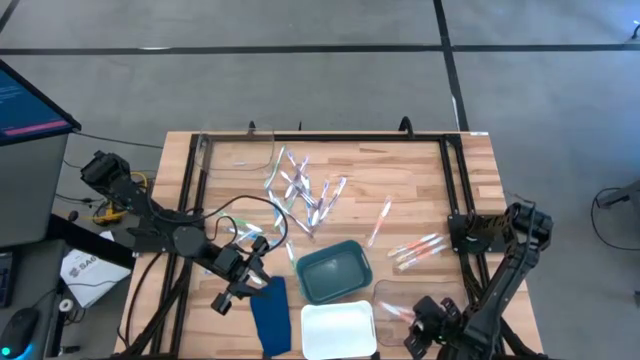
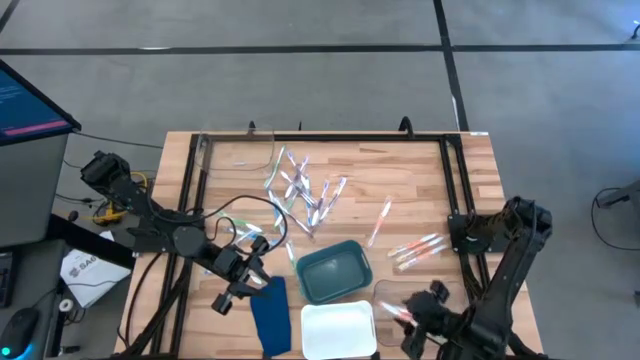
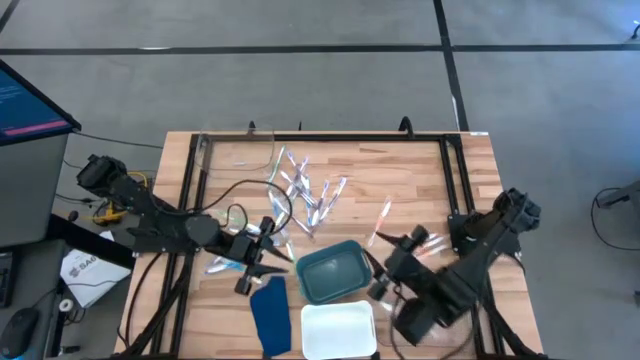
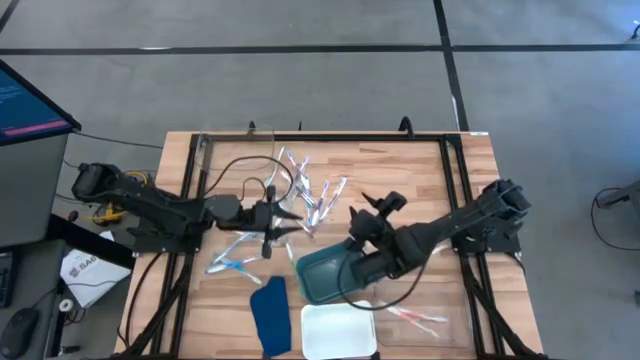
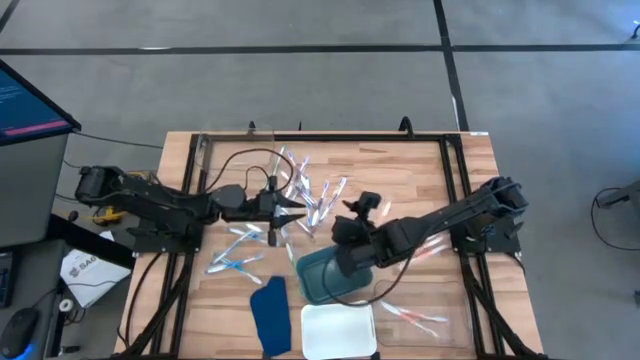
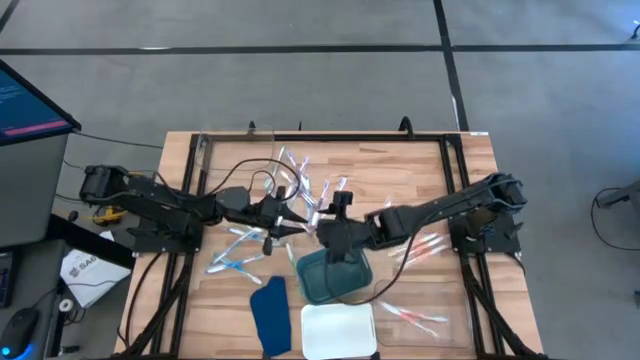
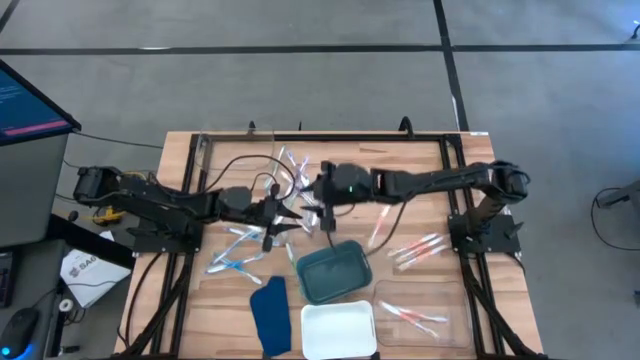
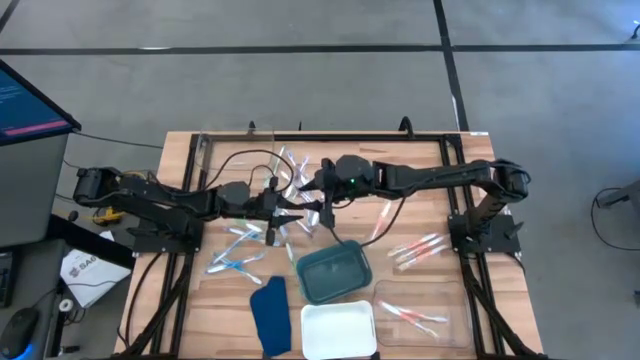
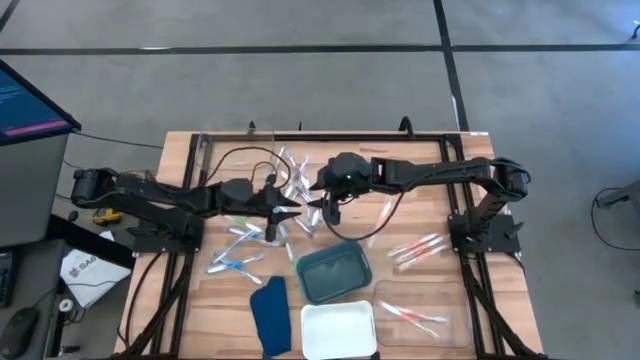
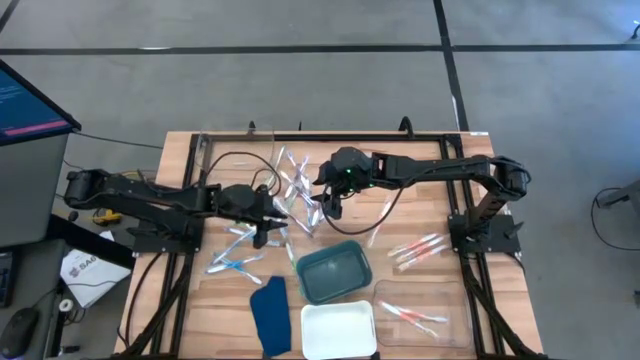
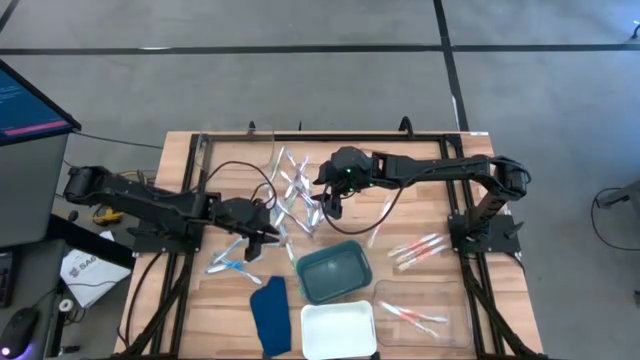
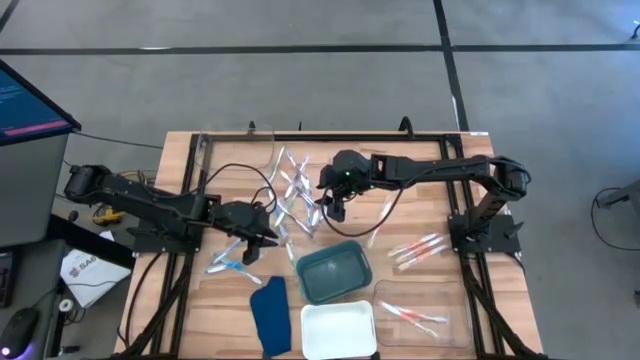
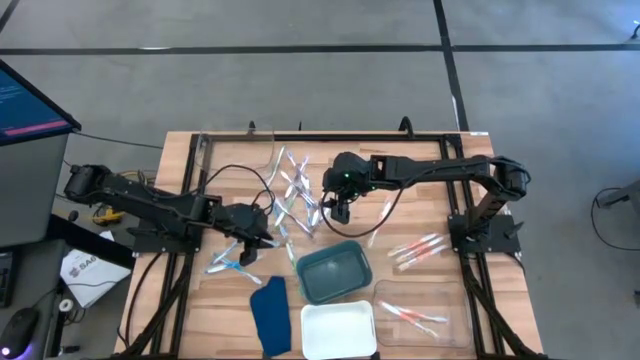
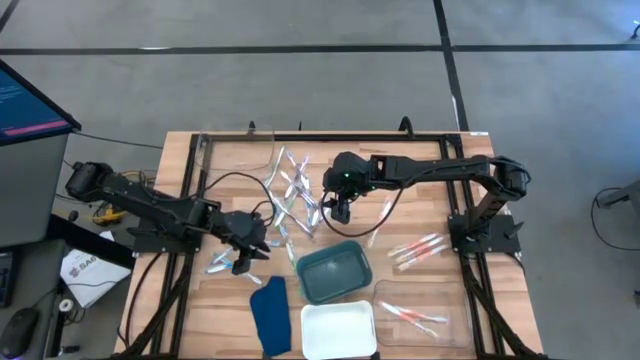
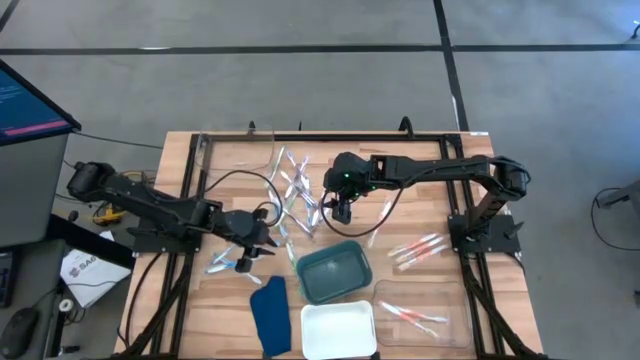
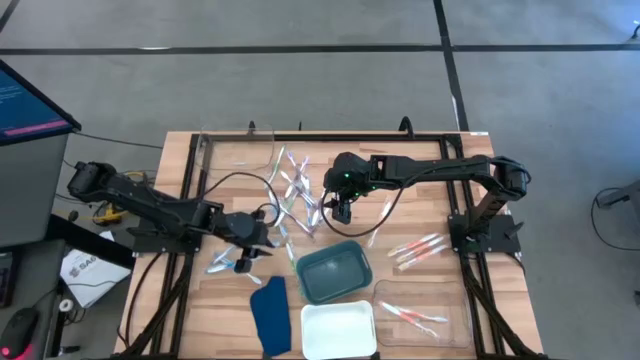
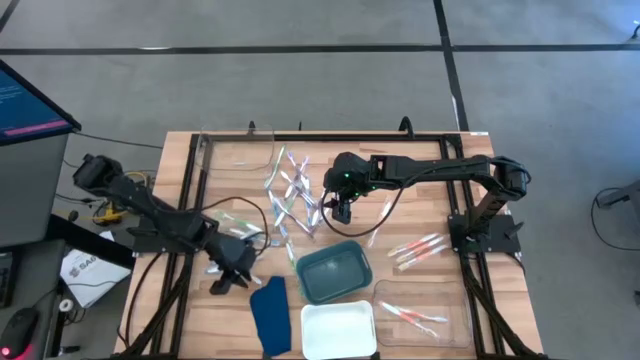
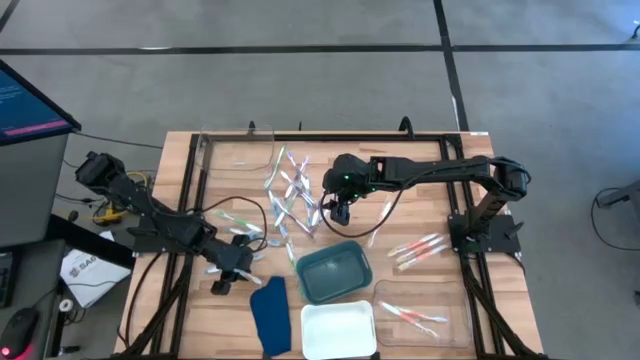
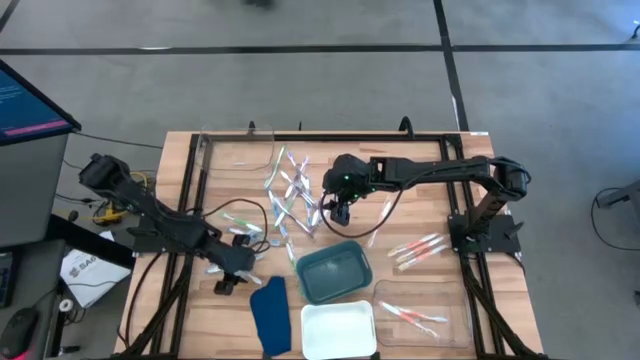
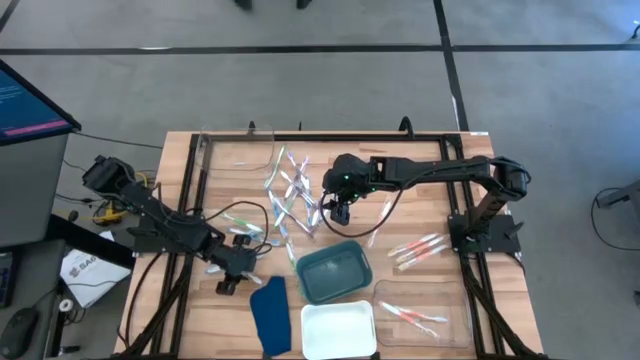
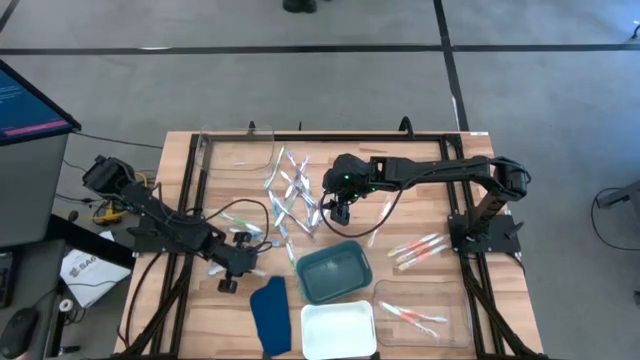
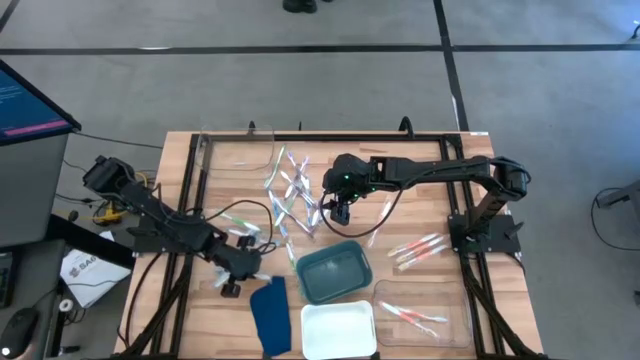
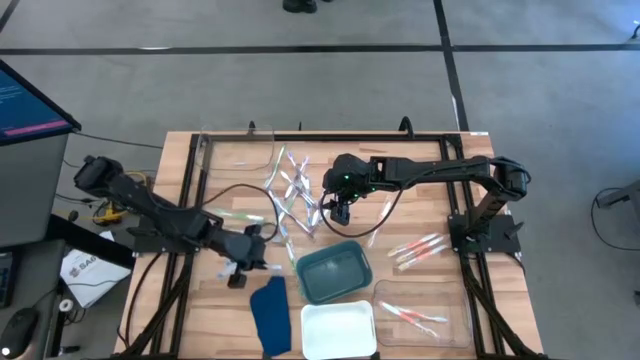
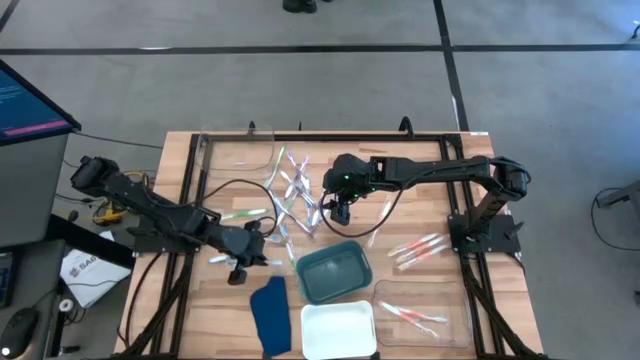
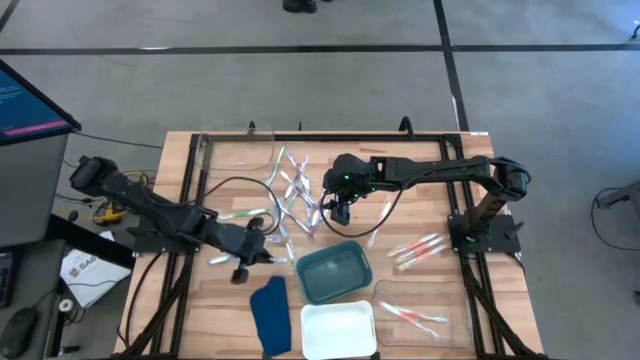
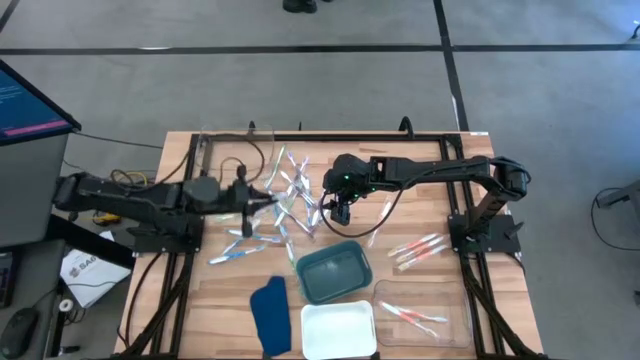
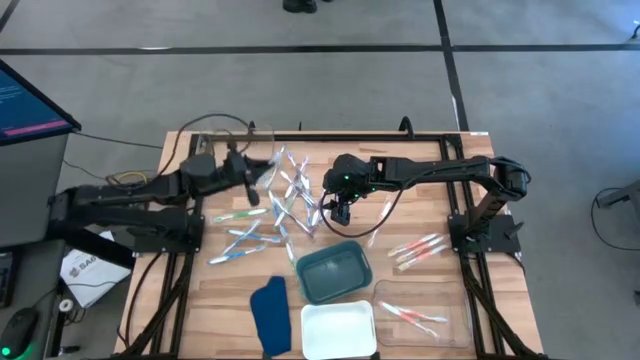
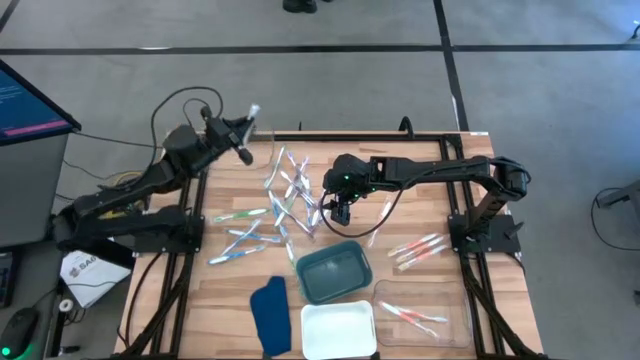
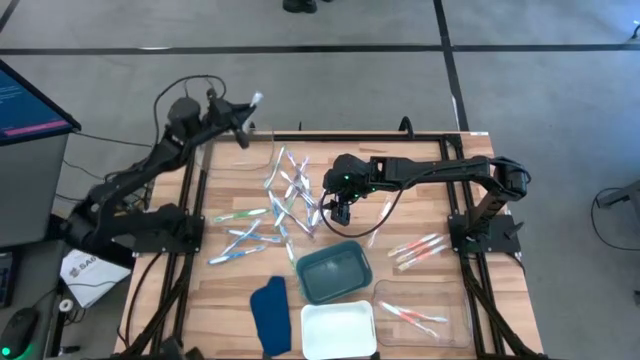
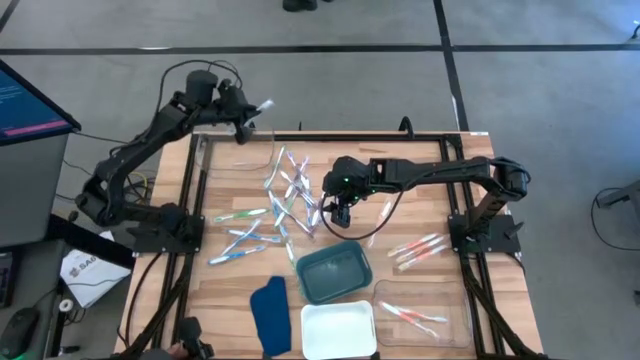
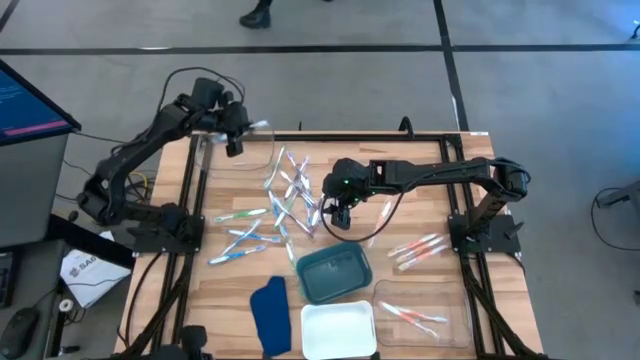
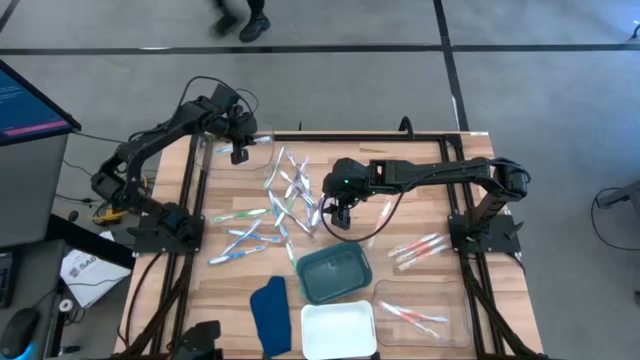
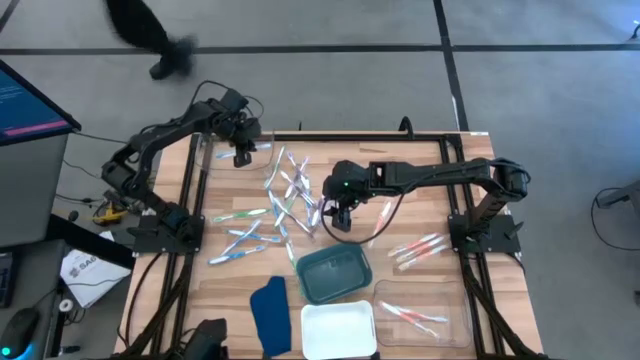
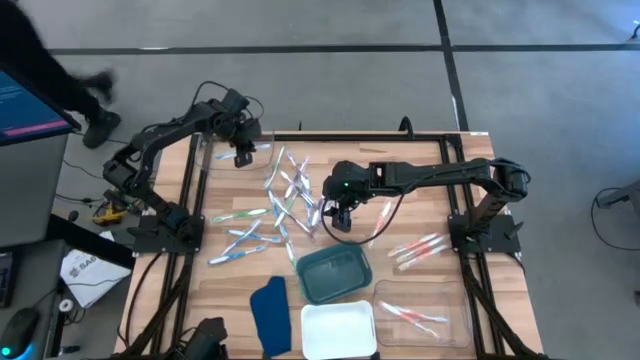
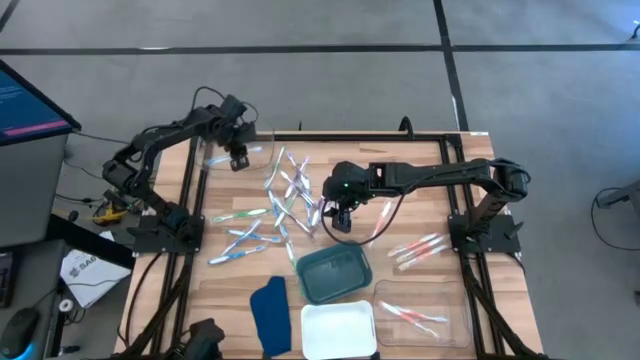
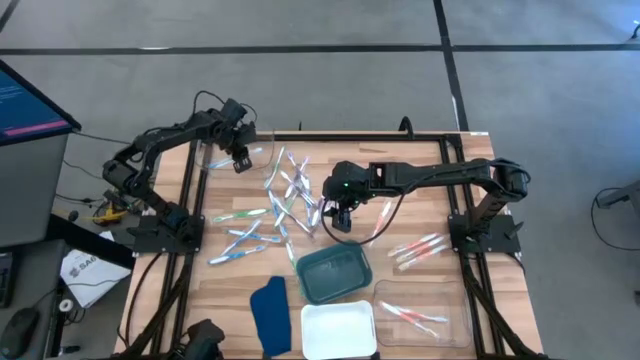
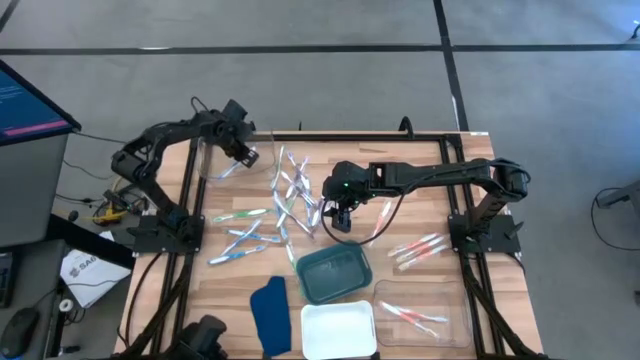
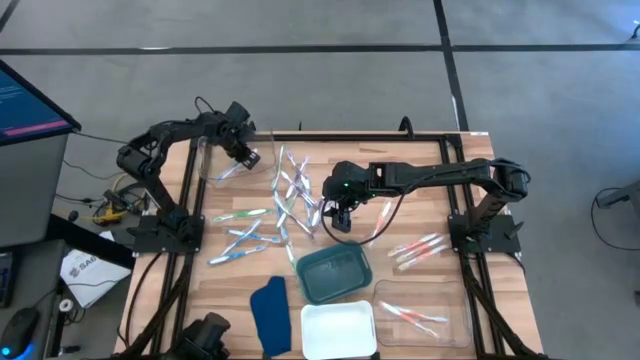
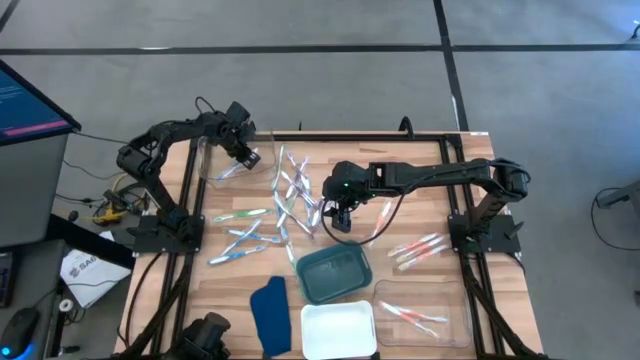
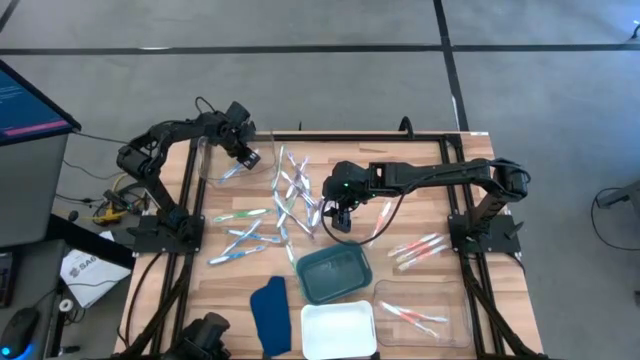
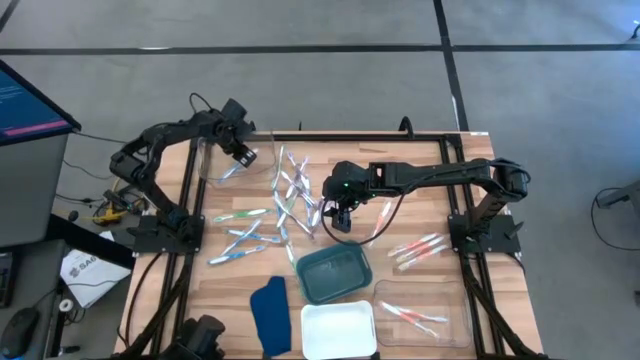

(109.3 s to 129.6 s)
Task: Pick & Place Toothbrushes
Put the blue toothbrush into the top transparent bin
